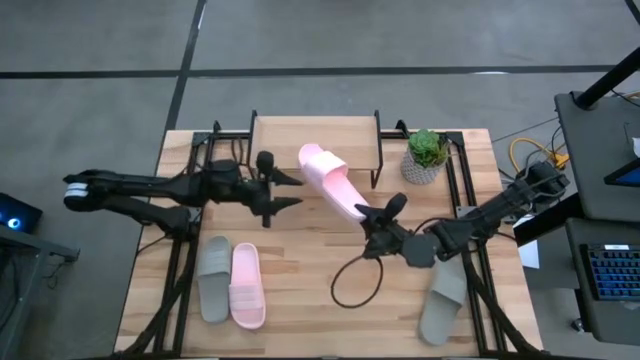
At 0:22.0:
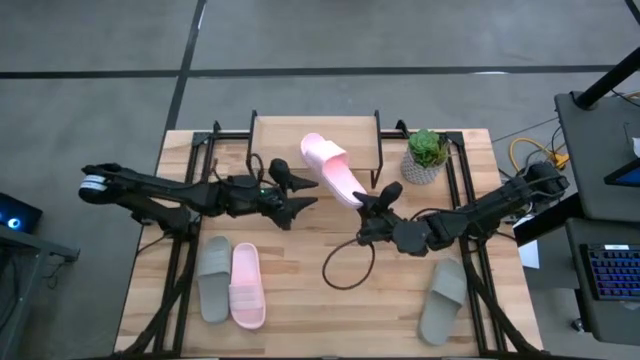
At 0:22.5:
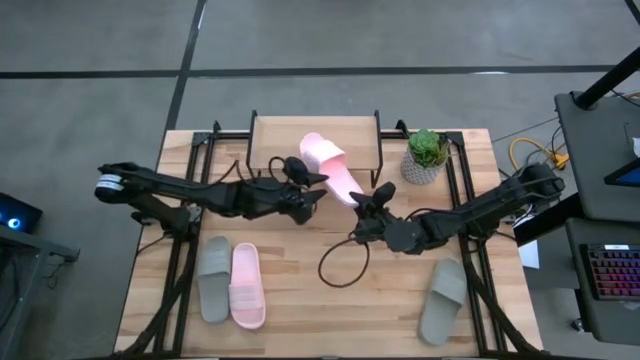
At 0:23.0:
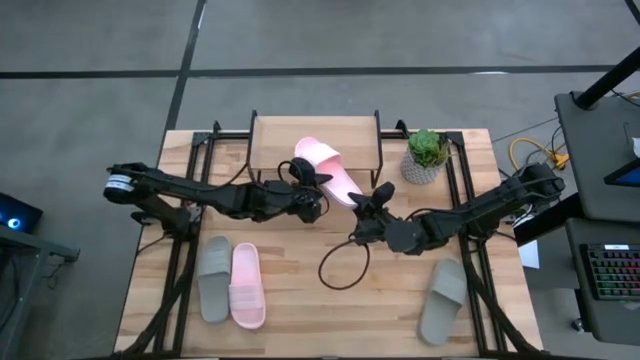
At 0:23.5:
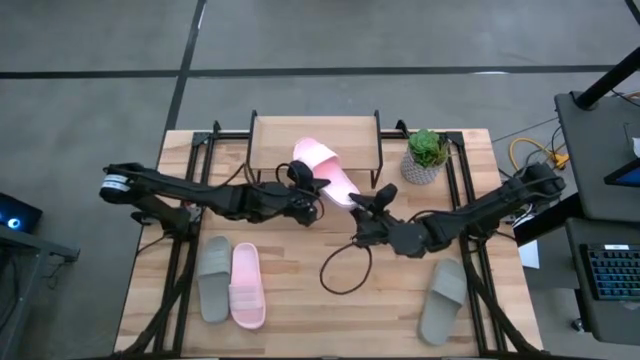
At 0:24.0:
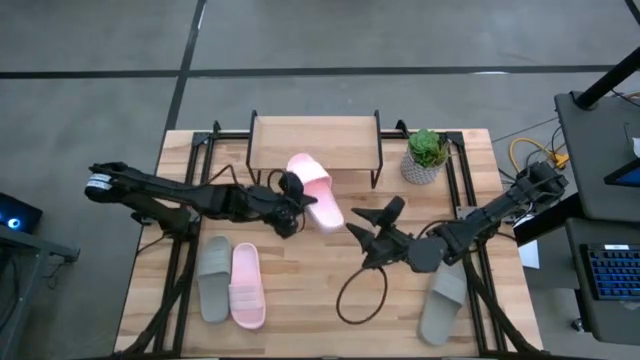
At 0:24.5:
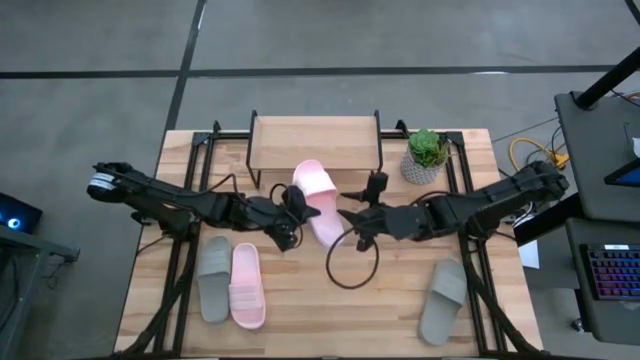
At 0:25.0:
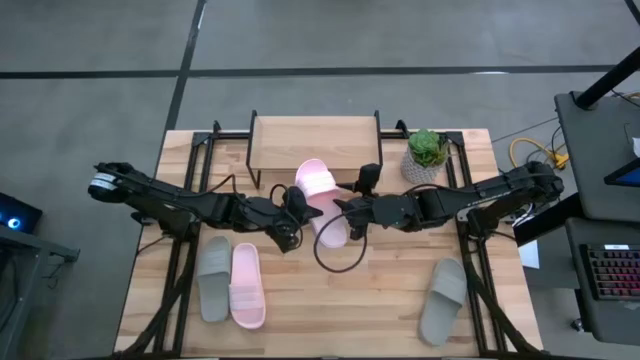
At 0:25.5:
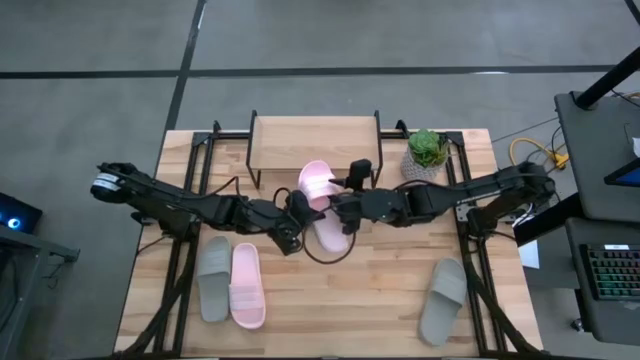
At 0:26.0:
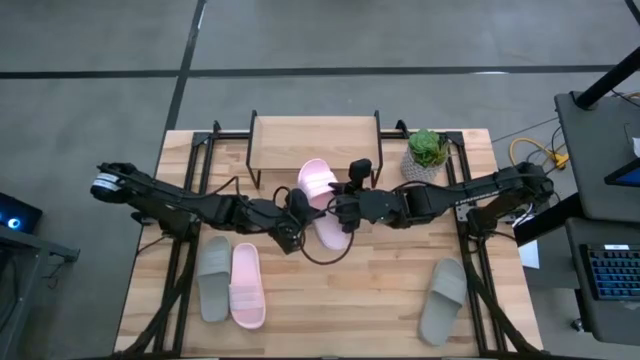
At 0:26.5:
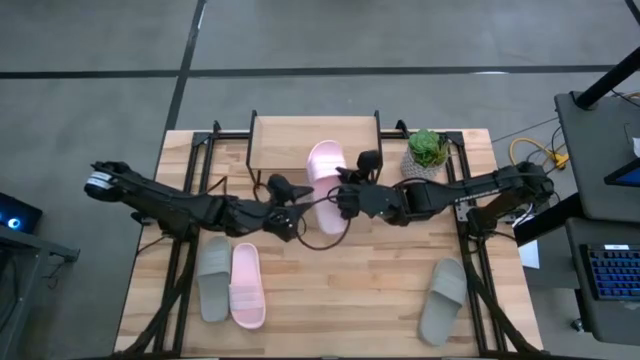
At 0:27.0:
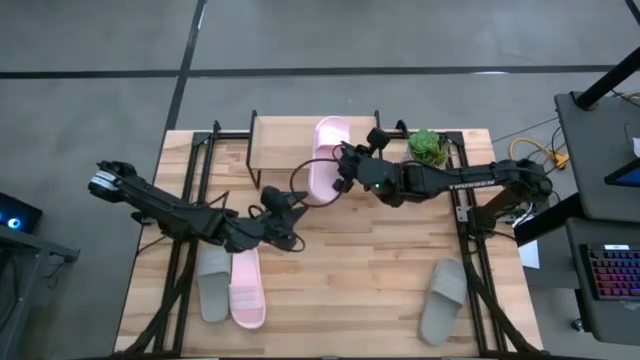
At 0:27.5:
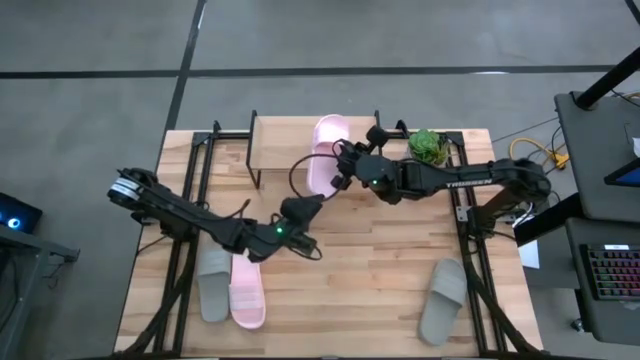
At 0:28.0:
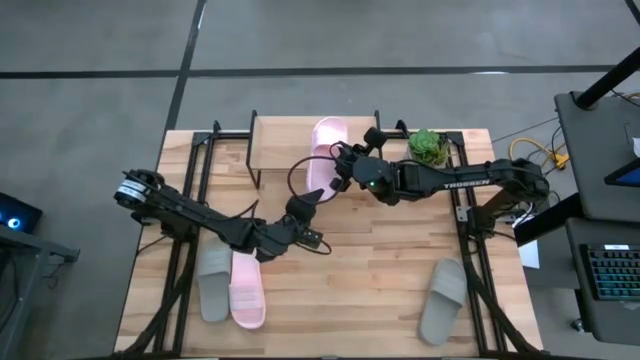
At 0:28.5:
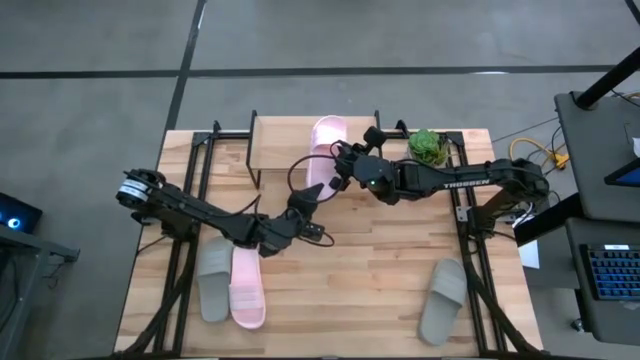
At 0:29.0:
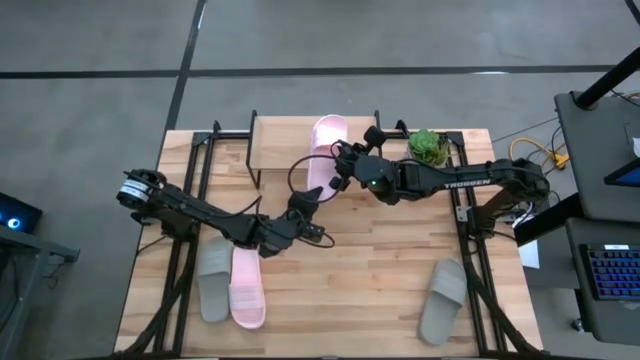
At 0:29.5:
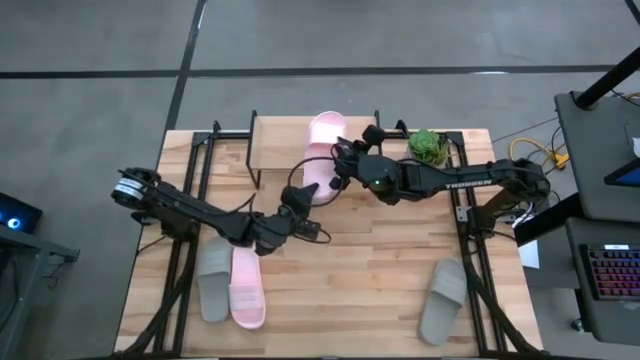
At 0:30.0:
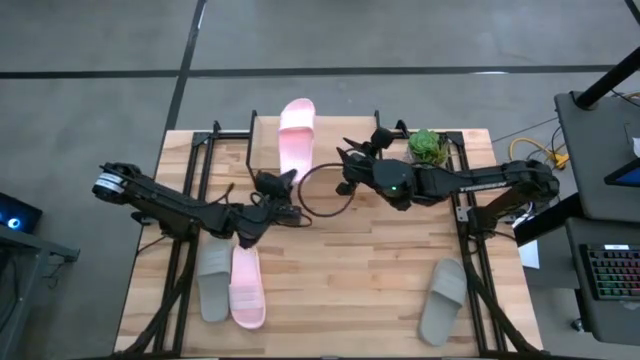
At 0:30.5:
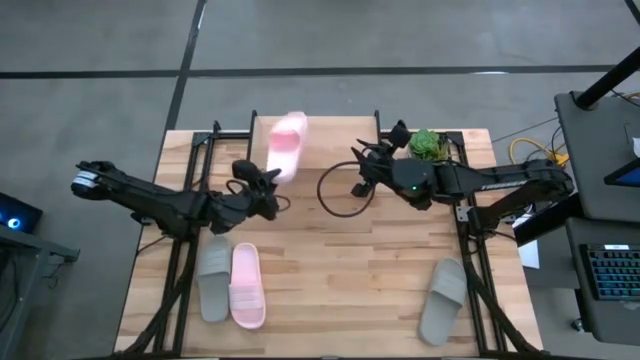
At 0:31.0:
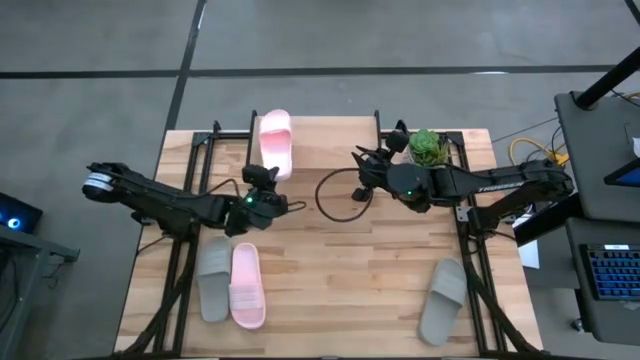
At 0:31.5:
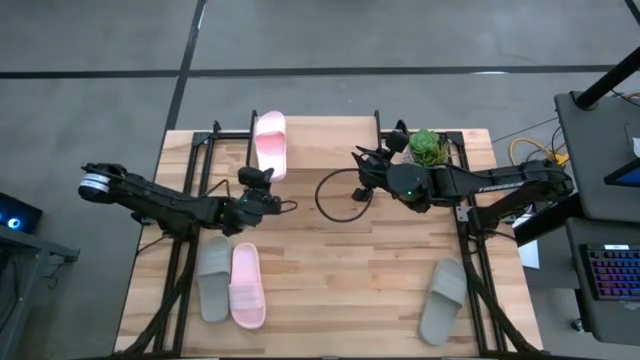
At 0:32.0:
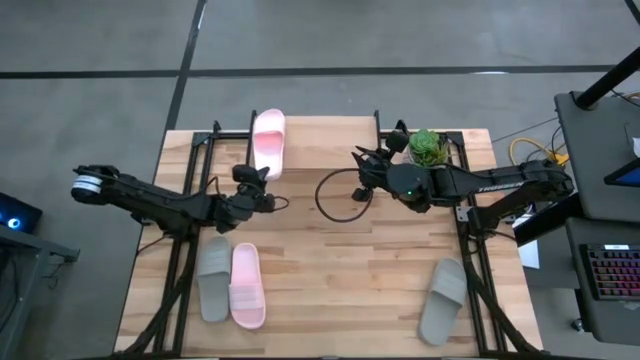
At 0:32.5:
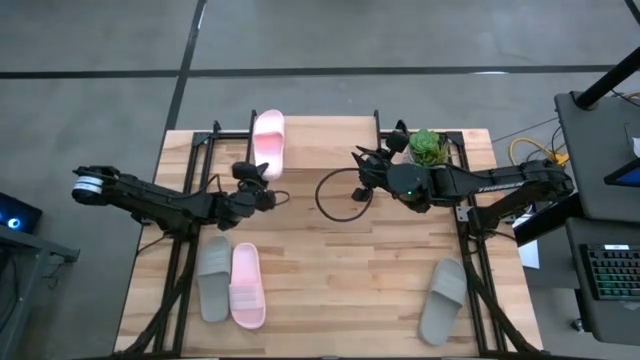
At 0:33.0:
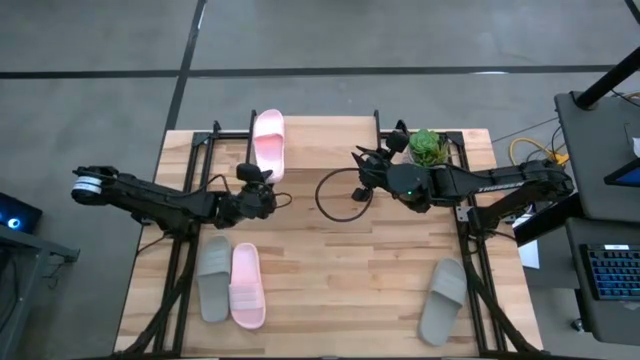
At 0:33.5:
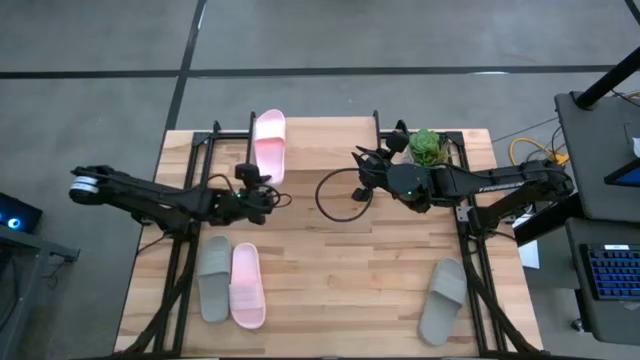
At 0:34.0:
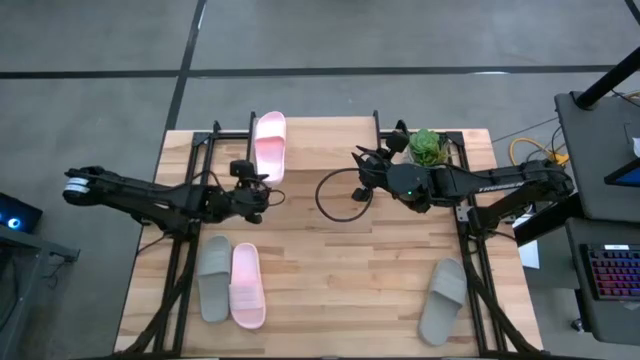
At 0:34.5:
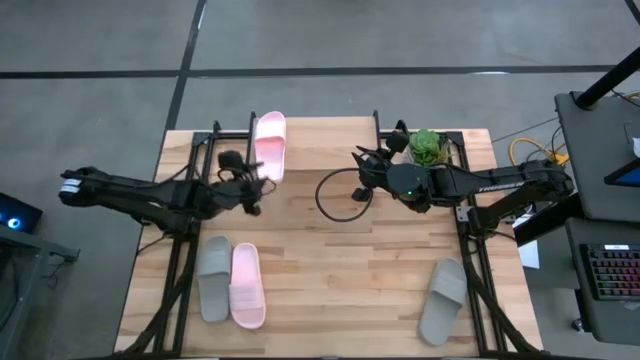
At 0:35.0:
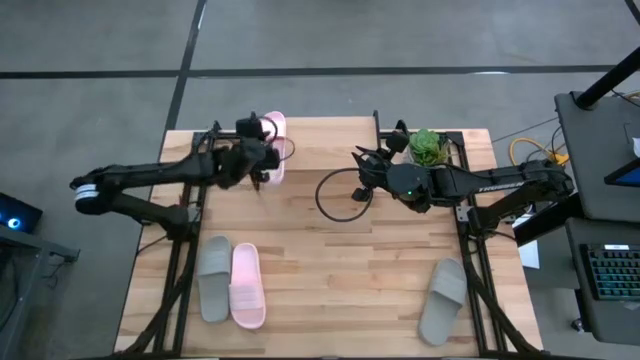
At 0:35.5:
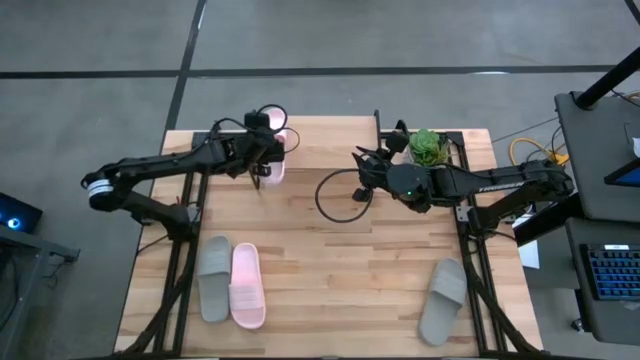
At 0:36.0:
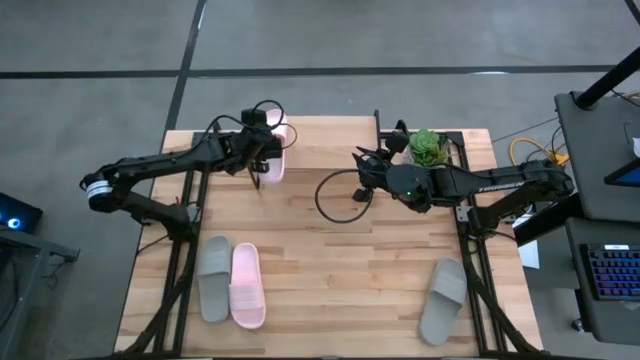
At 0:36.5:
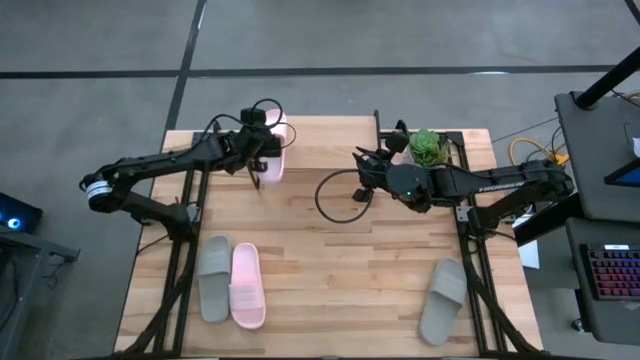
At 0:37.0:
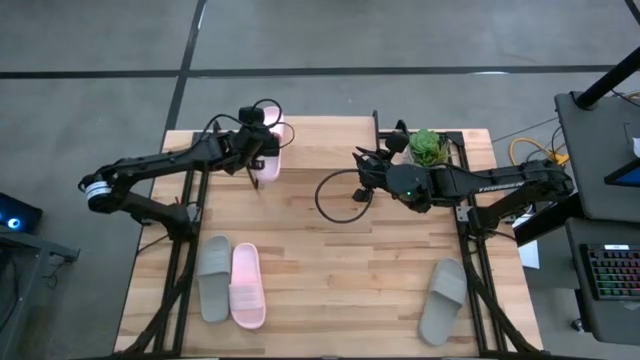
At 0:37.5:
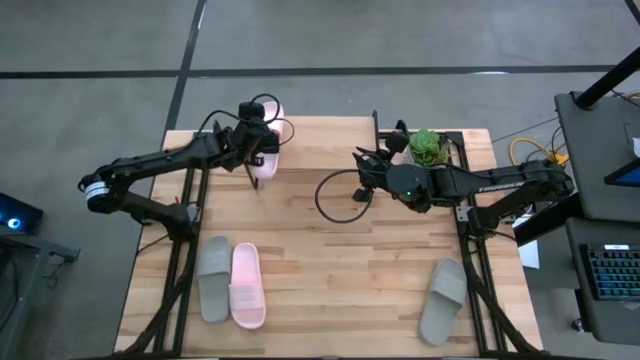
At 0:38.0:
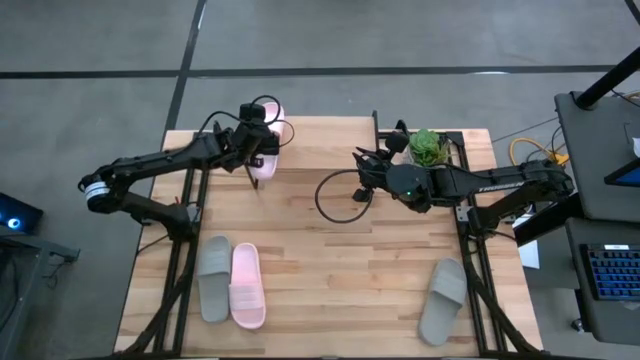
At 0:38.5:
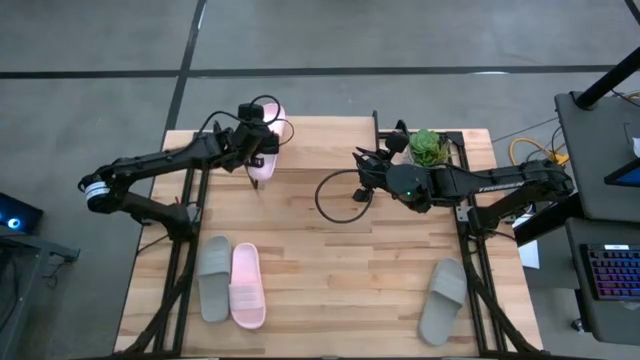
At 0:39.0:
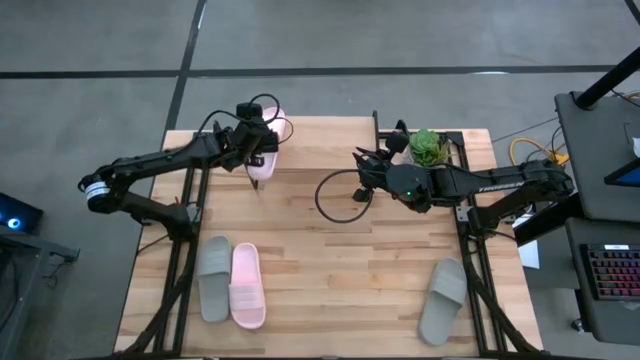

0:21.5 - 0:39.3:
Task: Pick and place slides into the shelf
Put the right pink slipper on the shelf

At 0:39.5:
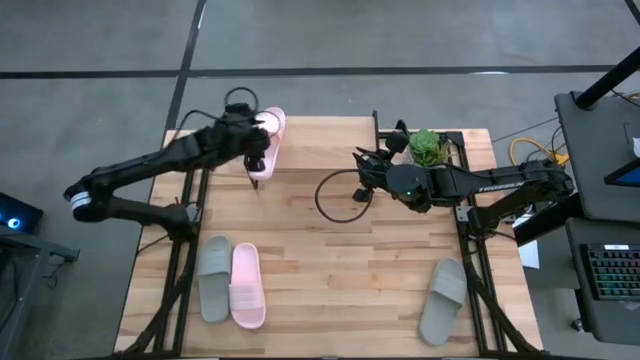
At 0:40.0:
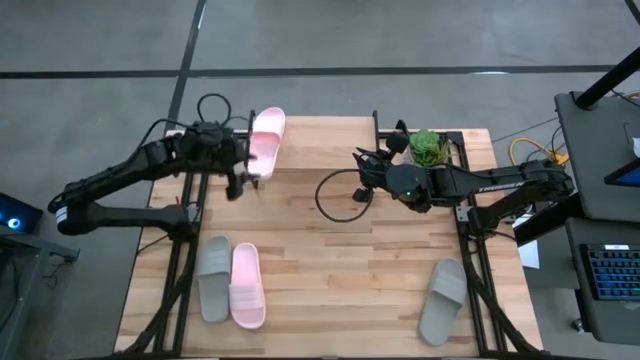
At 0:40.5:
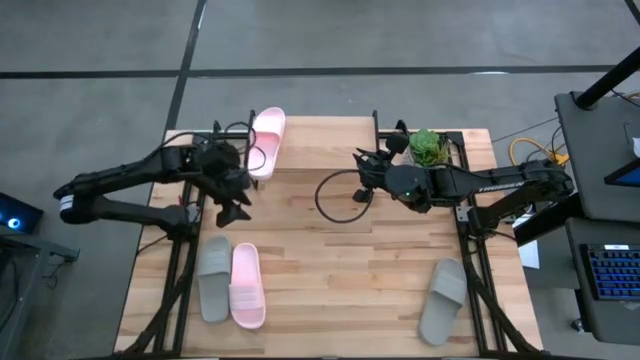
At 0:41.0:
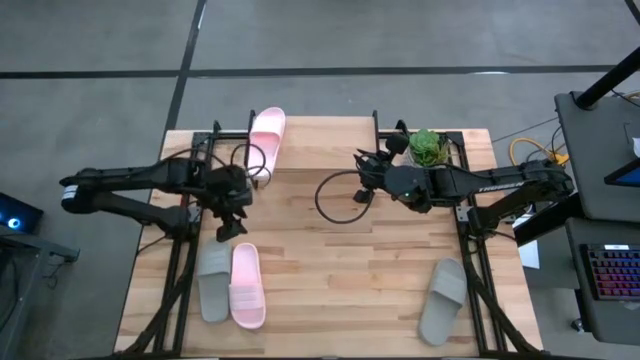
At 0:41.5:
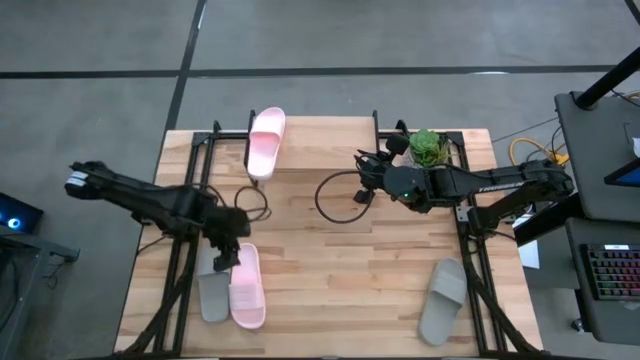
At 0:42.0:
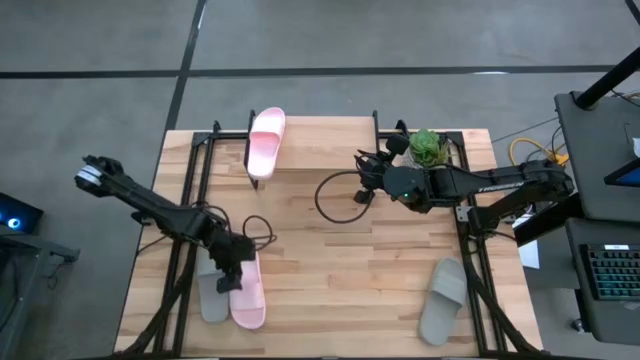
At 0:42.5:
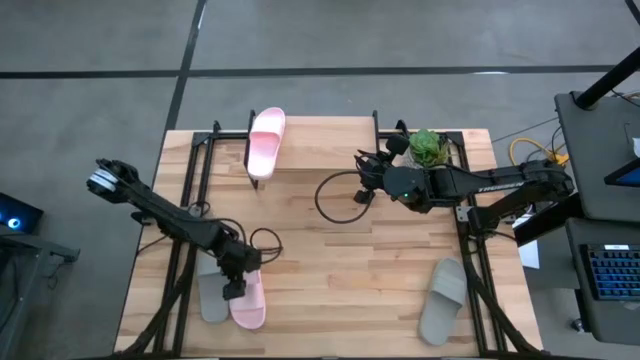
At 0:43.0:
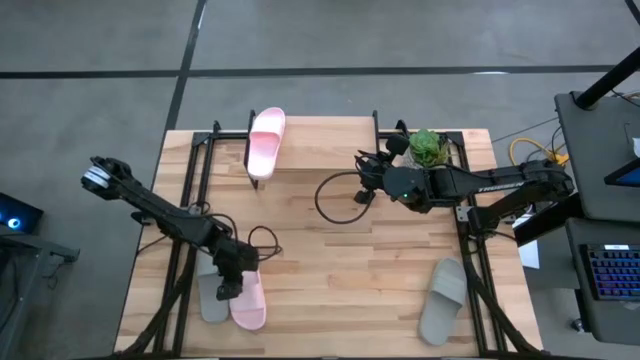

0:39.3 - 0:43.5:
Put the pink slipper on the shelf
